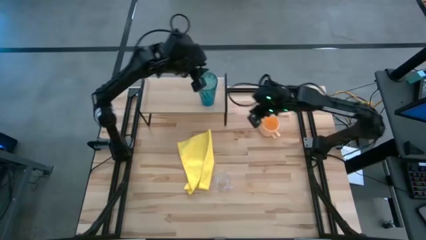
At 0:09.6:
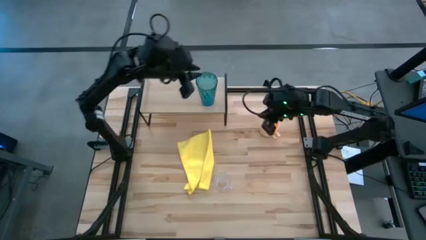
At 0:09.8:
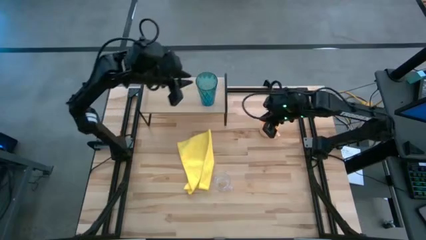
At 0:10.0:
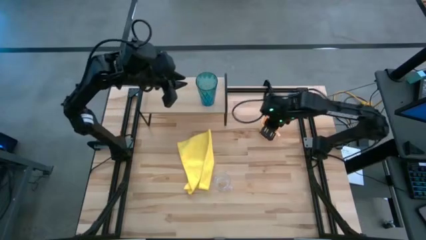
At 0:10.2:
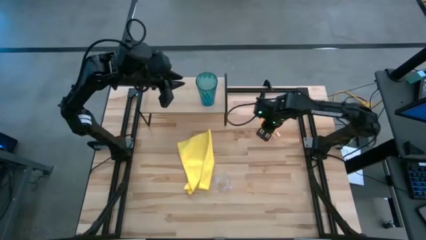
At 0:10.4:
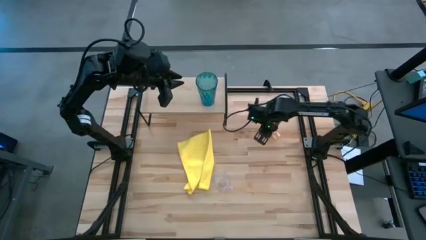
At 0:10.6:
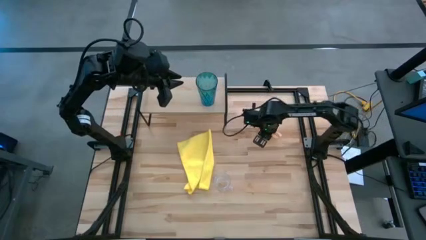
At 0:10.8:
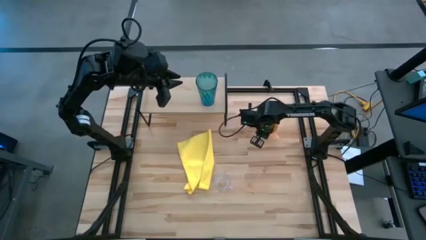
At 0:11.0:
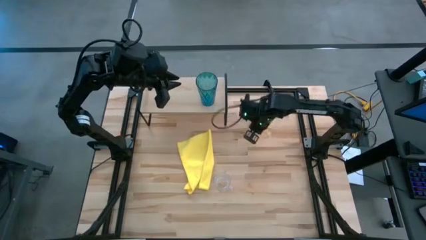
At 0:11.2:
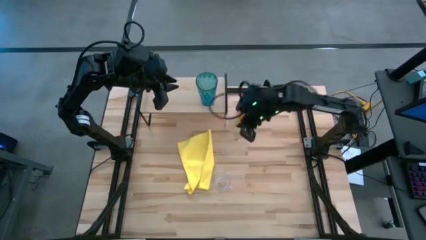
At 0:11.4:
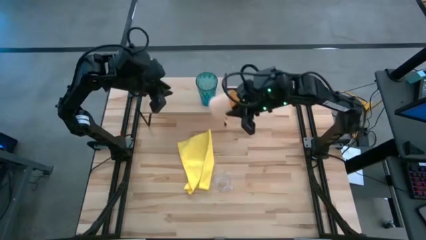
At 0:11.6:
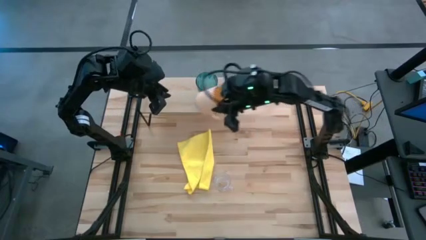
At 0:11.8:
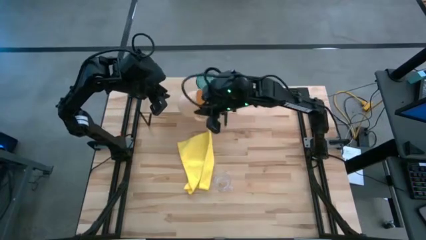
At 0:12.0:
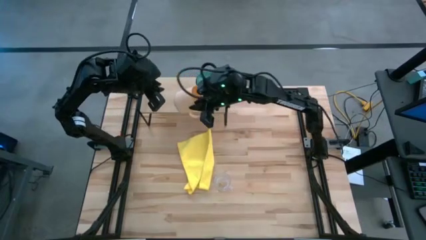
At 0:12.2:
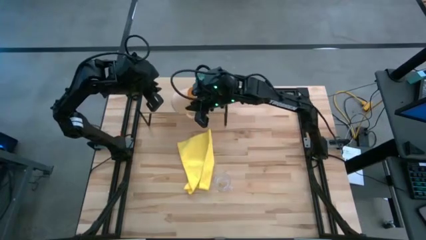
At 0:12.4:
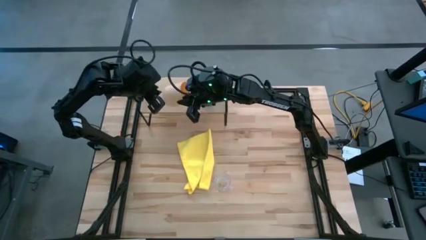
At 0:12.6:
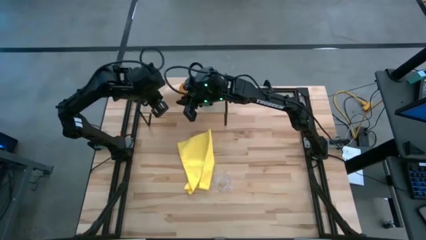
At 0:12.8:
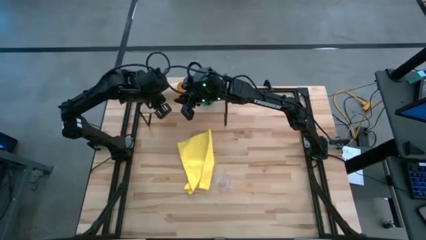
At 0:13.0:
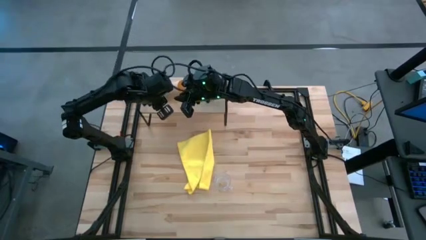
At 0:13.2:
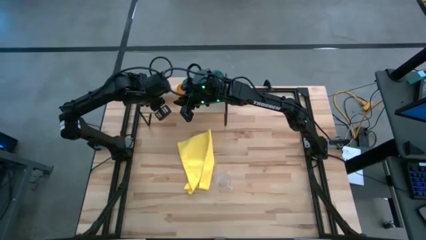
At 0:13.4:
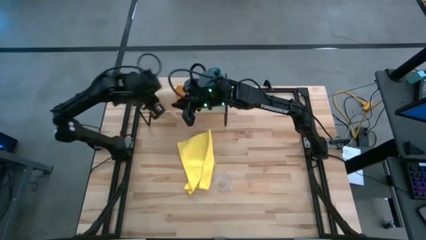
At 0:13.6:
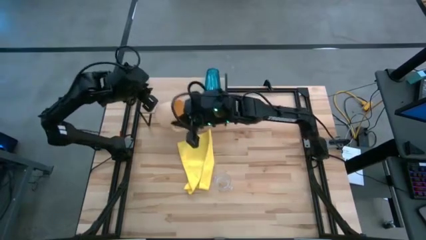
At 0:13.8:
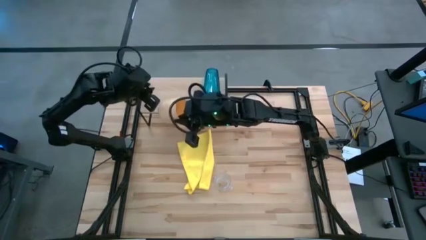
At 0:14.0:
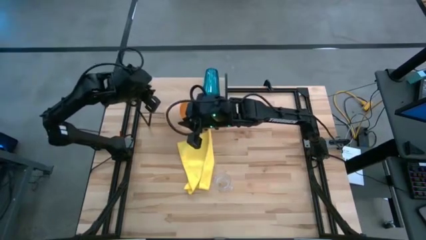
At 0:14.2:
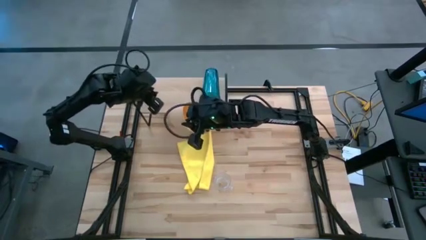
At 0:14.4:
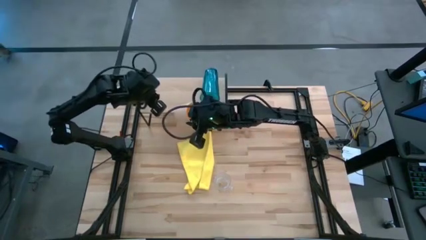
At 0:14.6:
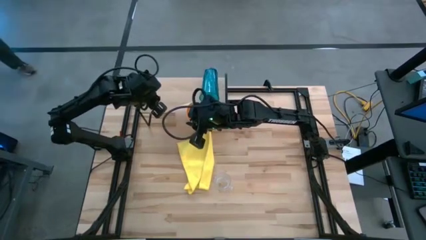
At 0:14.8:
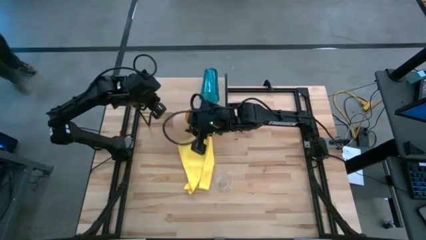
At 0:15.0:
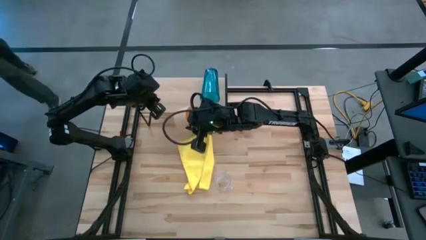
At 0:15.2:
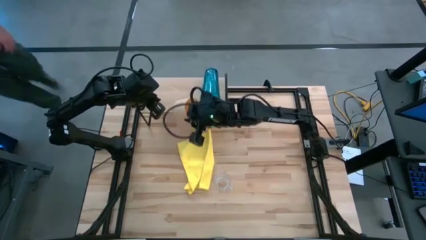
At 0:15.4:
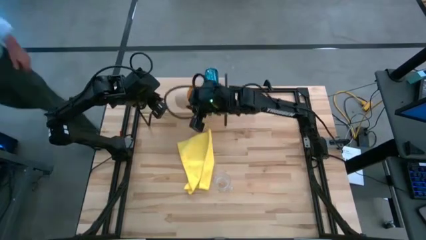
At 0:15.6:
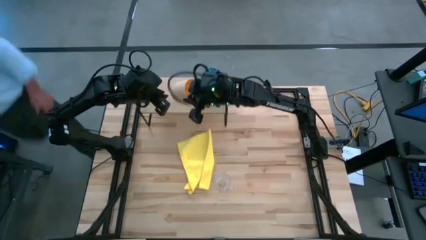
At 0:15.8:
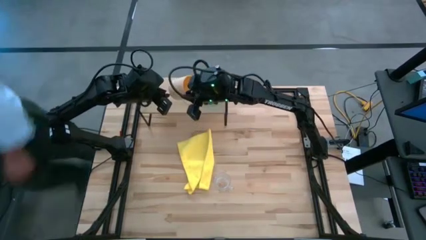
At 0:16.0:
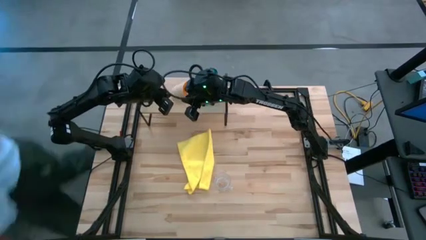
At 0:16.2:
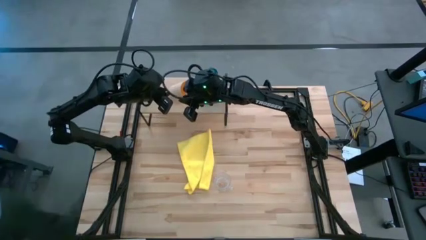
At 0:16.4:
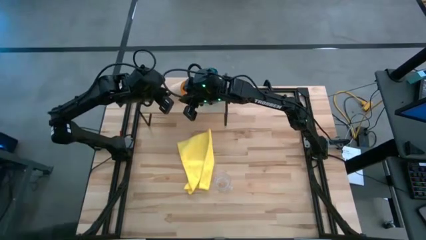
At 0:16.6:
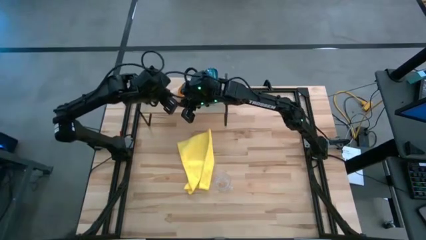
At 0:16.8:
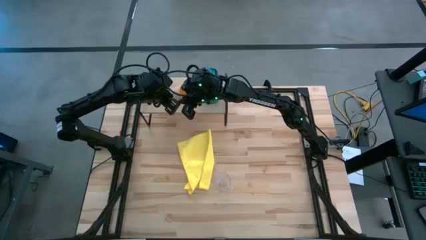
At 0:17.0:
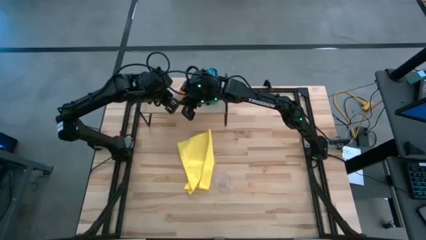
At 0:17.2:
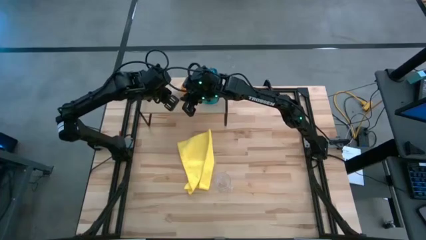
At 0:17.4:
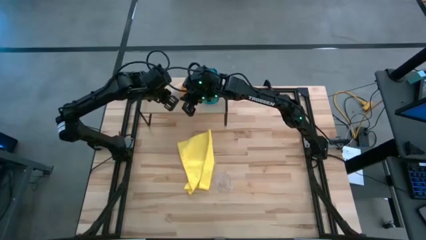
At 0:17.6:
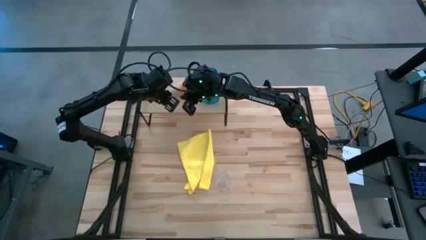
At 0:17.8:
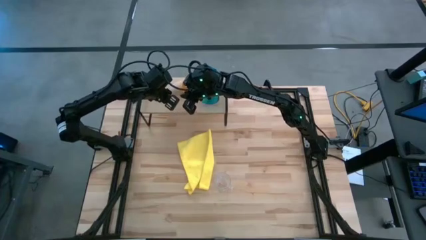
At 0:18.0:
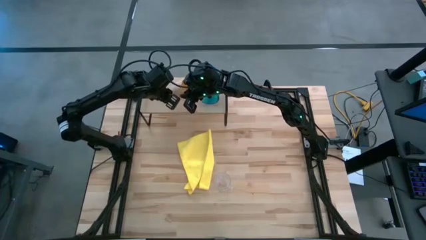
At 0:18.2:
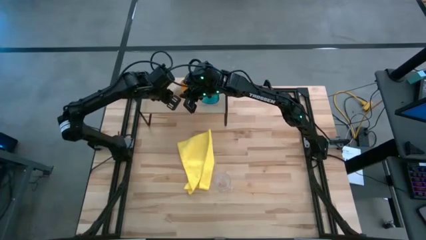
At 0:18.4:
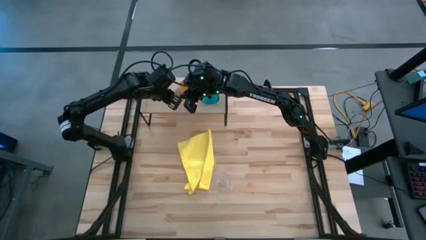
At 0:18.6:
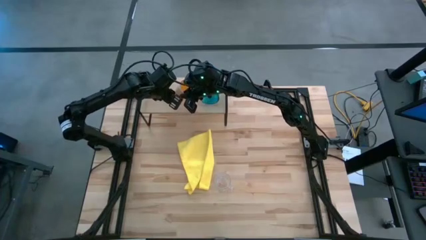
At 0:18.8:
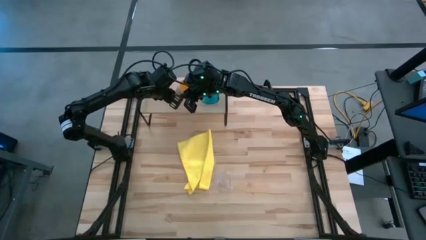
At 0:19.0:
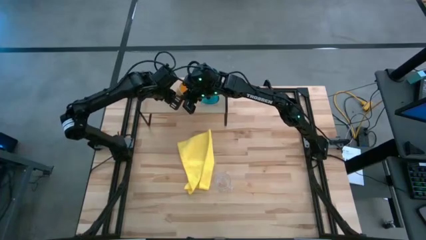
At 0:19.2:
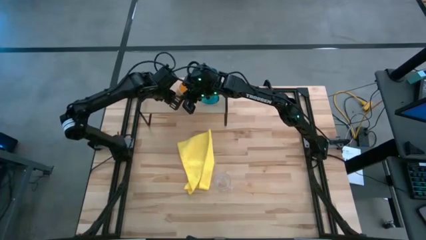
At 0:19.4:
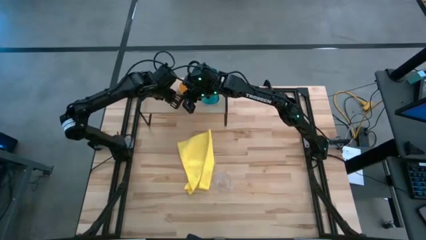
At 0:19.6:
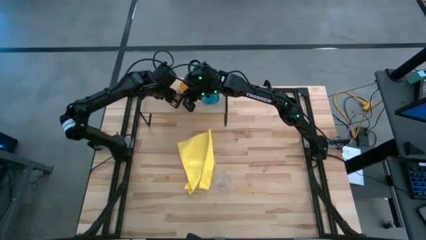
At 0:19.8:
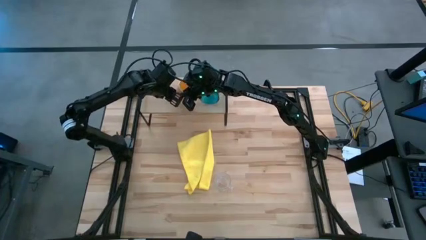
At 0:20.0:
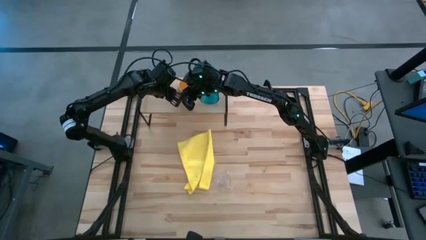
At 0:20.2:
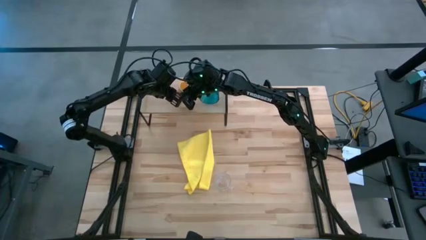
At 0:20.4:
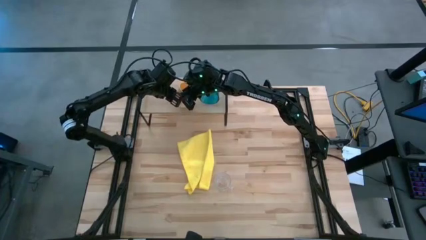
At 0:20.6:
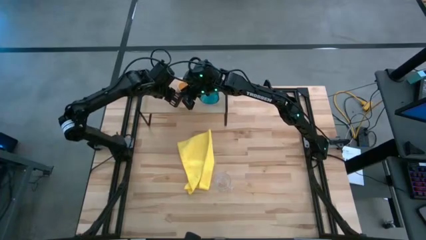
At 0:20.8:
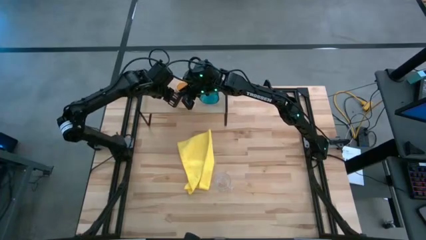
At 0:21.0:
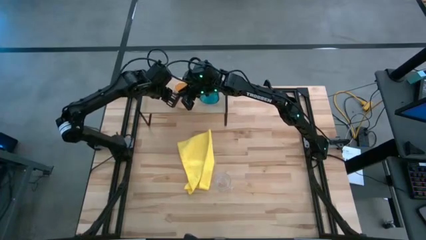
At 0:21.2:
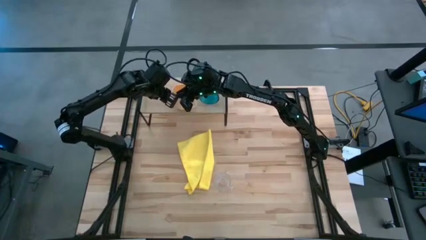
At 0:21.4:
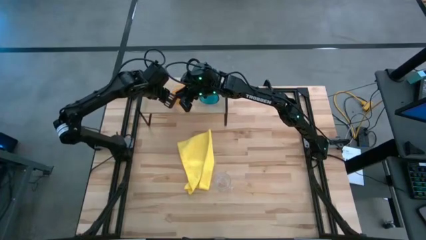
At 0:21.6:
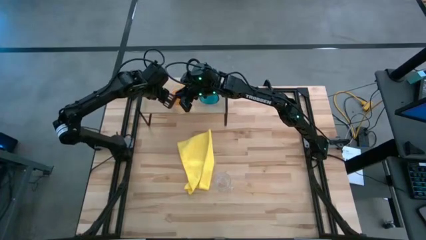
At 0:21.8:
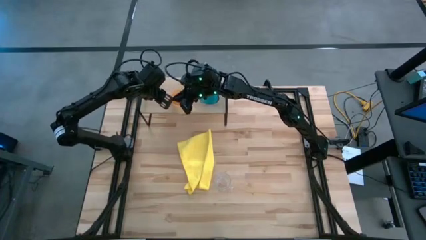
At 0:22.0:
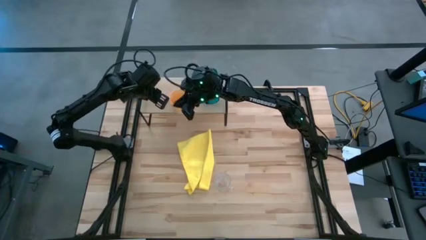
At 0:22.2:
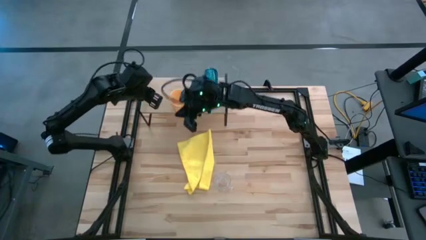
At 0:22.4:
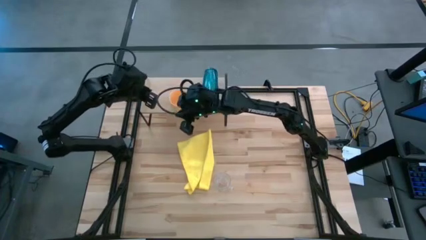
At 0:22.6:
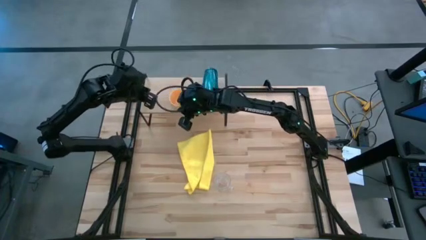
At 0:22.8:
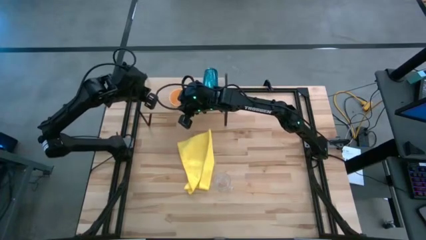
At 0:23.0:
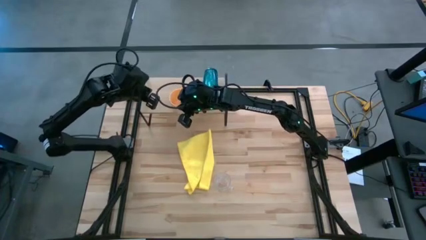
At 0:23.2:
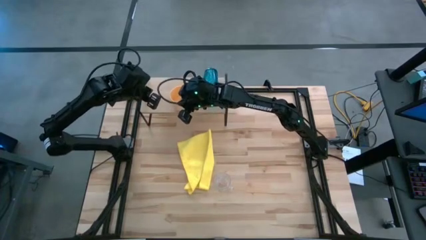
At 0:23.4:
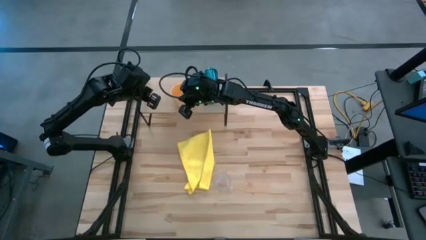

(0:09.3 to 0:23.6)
Task: Stack small to large cups/mugs on shelf
Put the orange mug on the shelf

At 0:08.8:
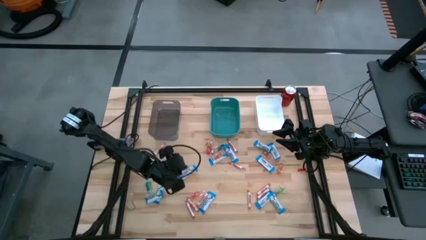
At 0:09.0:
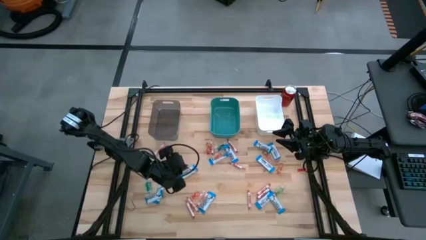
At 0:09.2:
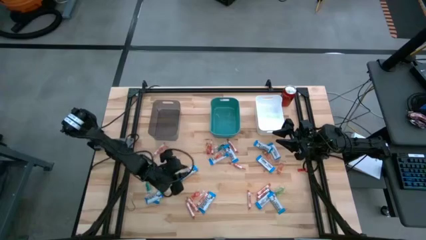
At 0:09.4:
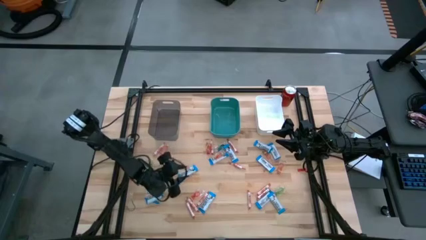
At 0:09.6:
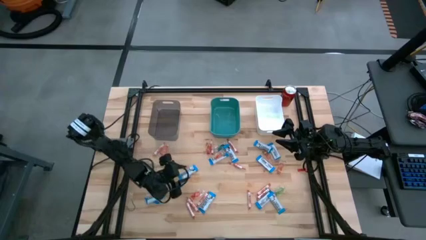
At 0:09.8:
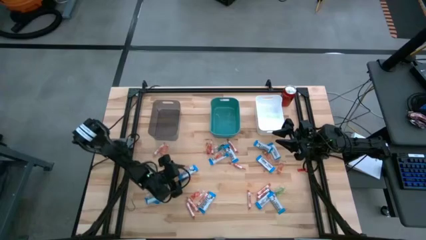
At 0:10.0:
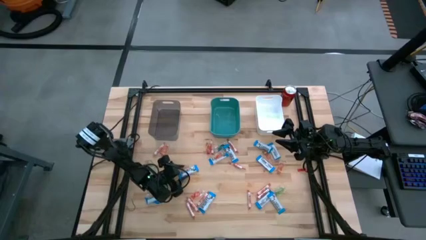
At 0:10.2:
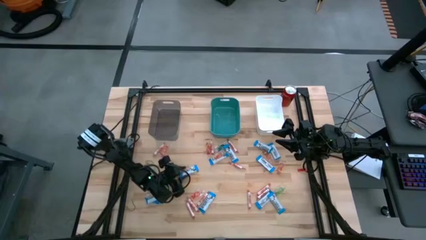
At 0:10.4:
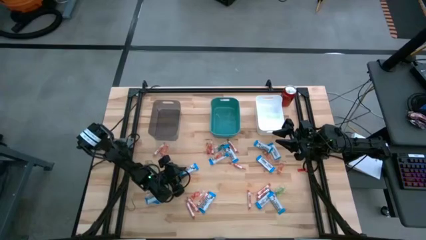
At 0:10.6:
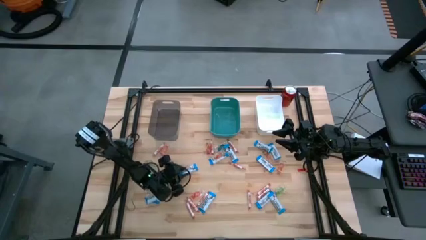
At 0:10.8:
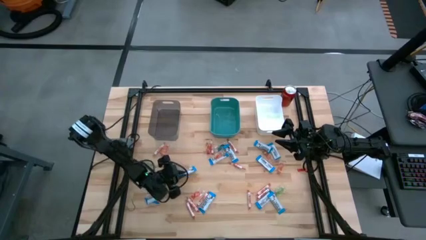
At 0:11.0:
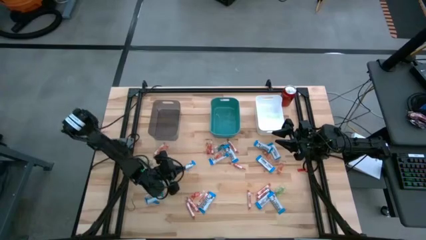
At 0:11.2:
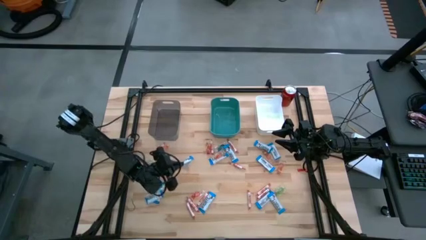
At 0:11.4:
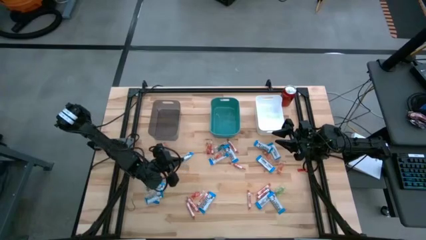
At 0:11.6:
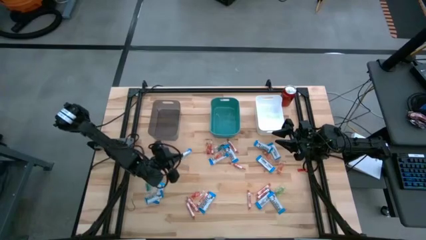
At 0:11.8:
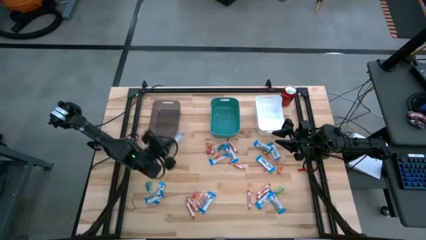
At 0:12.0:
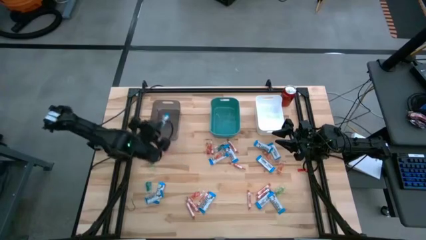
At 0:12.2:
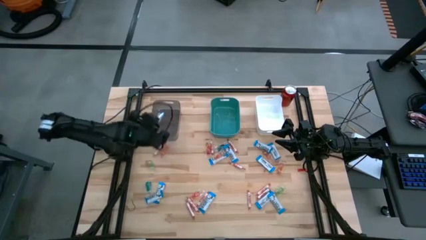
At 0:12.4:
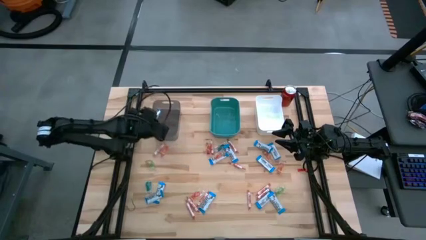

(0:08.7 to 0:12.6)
Task: Sort candy
Put the white chocolate into the black bin
